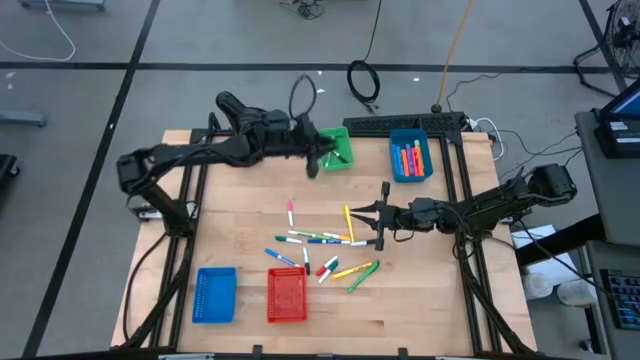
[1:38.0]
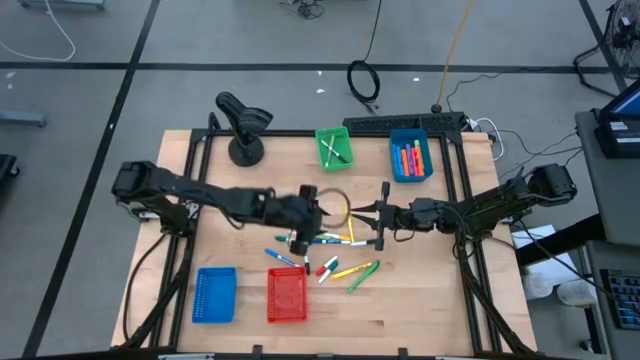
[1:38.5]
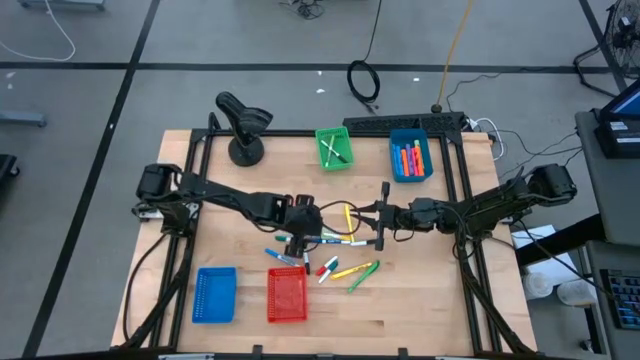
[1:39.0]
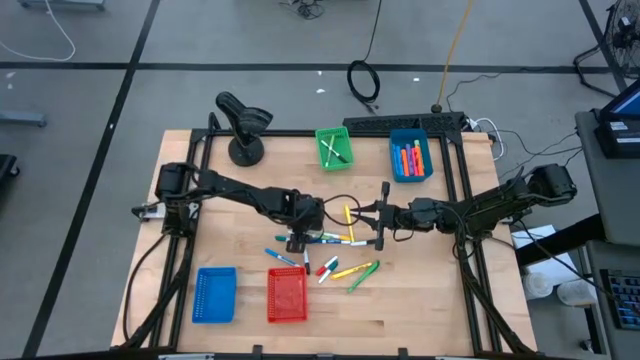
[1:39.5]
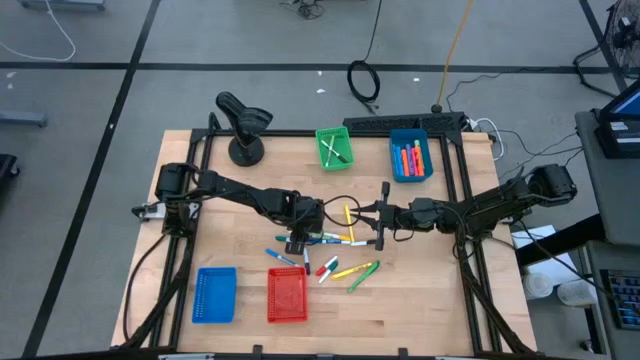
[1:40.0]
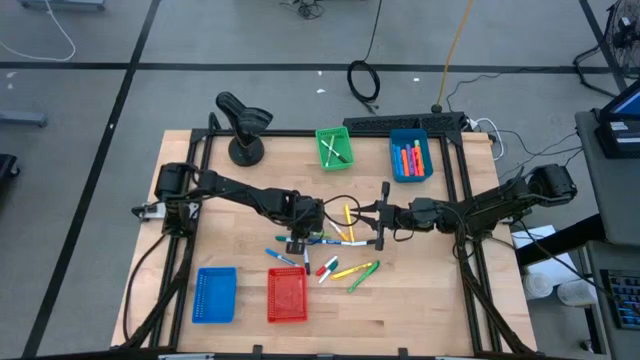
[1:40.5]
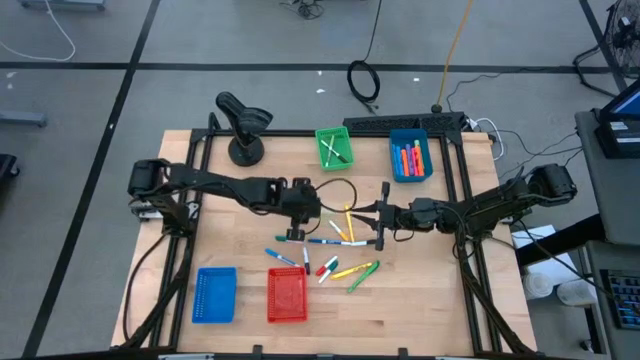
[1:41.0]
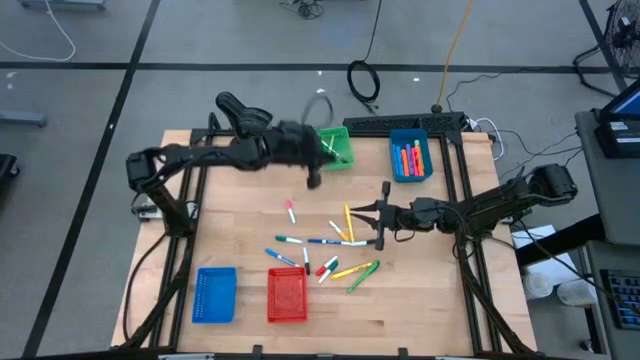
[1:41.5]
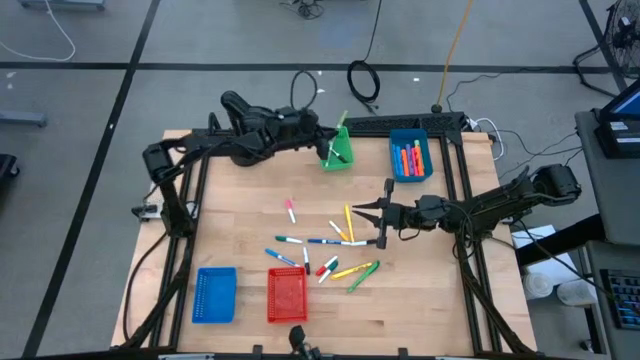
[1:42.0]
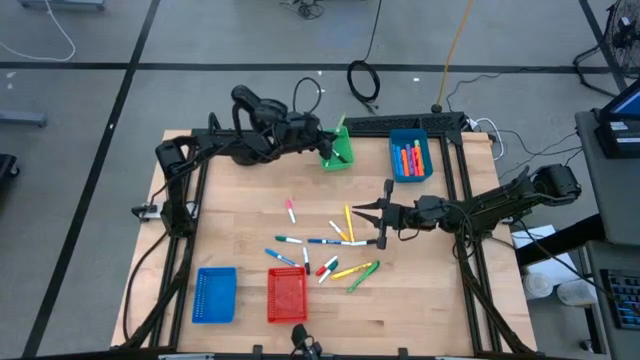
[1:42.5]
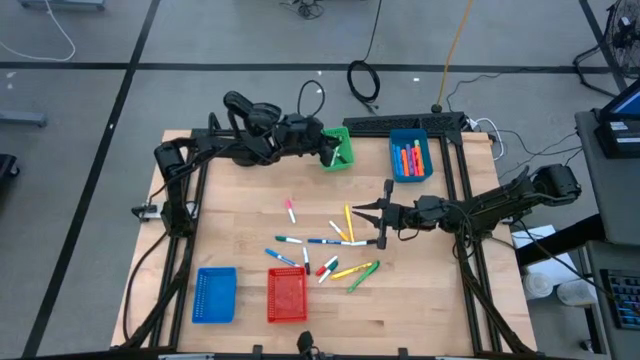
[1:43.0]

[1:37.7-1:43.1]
Task: Pick & Place Markers
Put the green thin dry erase marker into the green bin

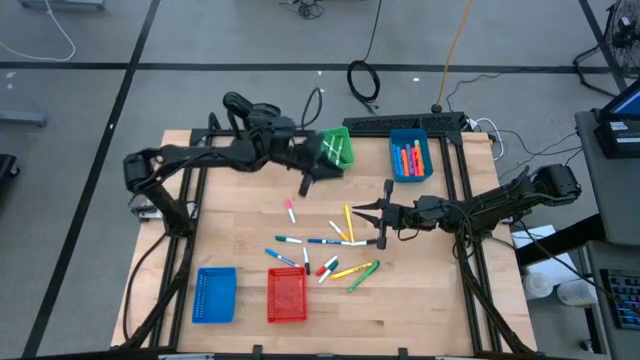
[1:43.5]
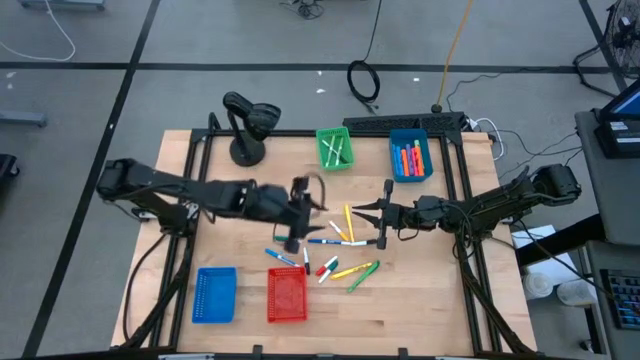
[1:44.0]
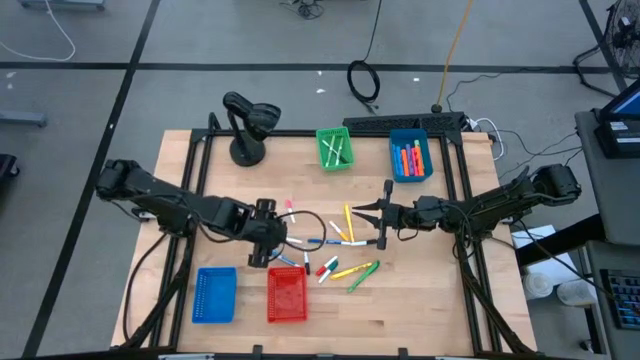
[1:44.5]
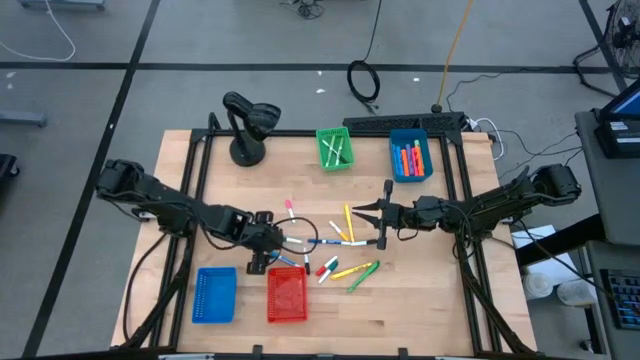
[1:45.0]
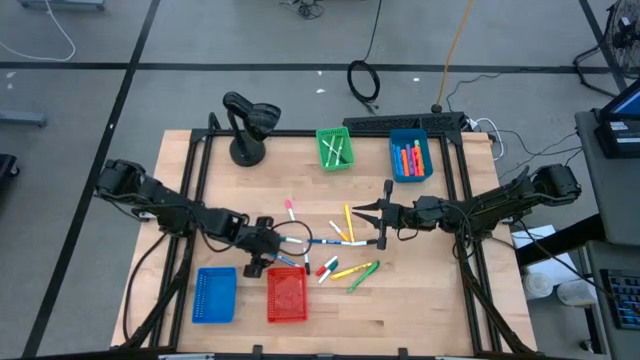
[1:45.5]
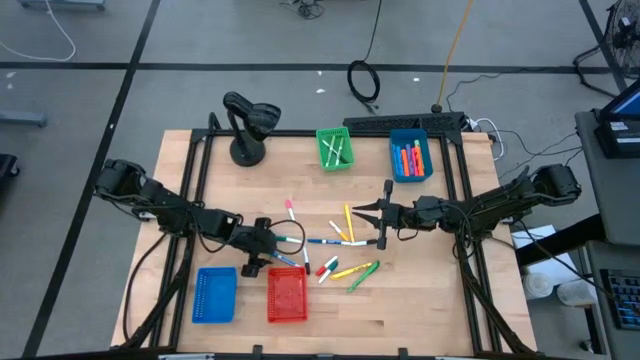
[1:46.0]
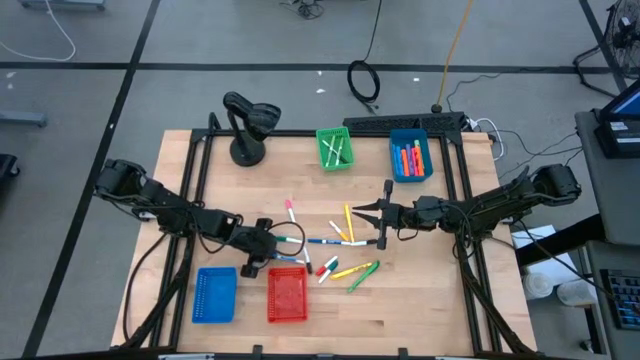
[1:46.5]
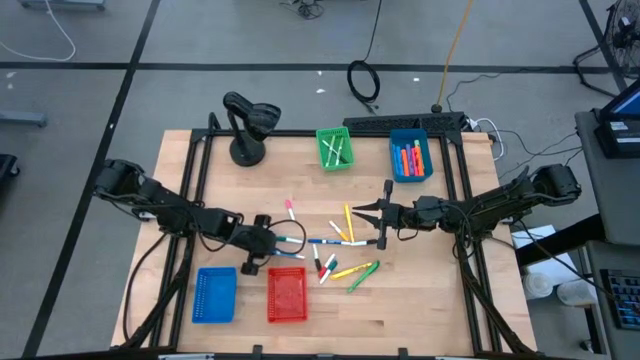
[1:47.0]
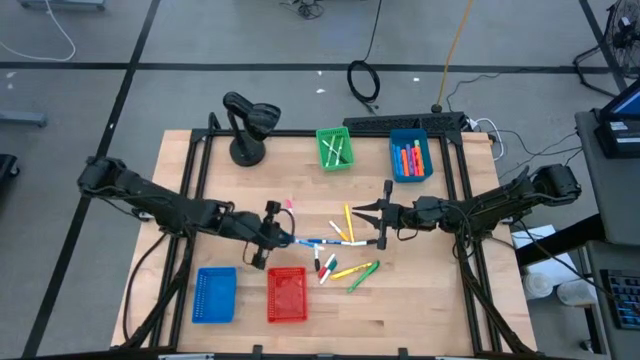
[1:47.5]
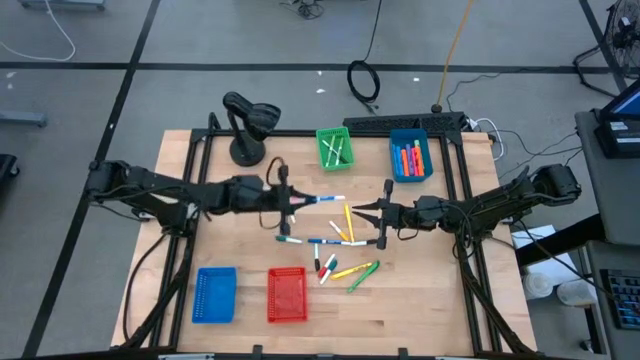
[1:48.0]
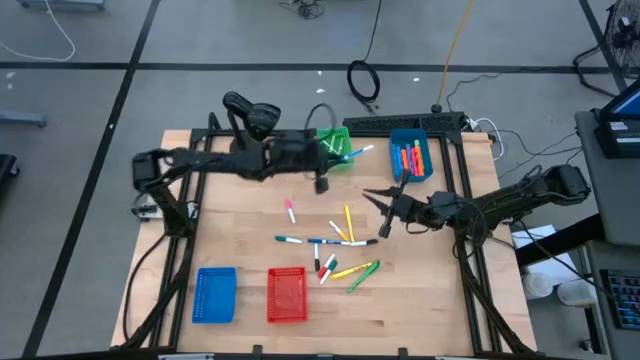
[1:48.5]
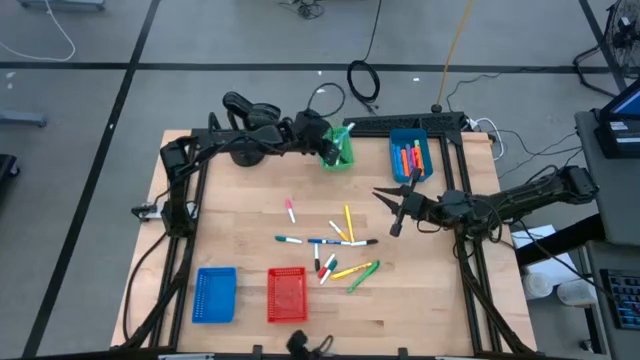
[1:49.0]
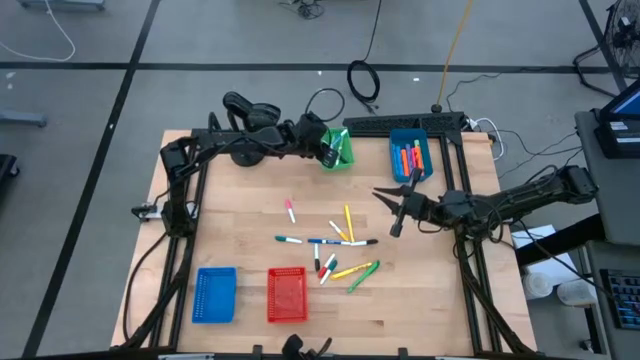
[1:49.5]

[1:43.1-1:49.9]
Put the light blue thin dry erase marker into the green bin

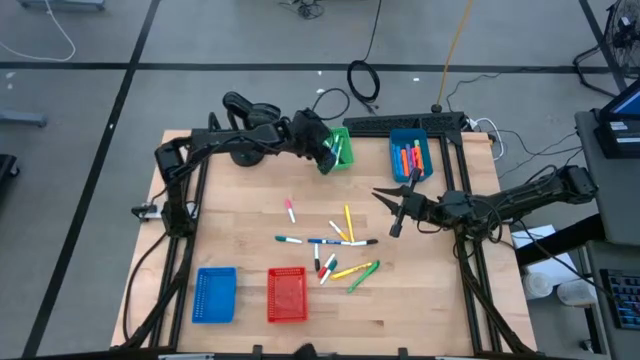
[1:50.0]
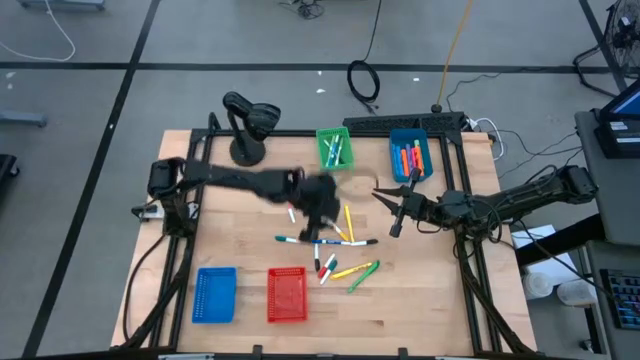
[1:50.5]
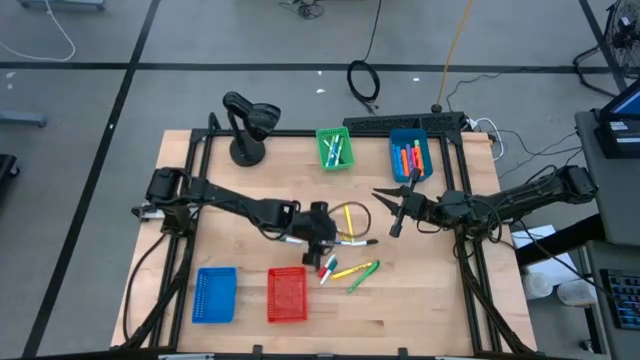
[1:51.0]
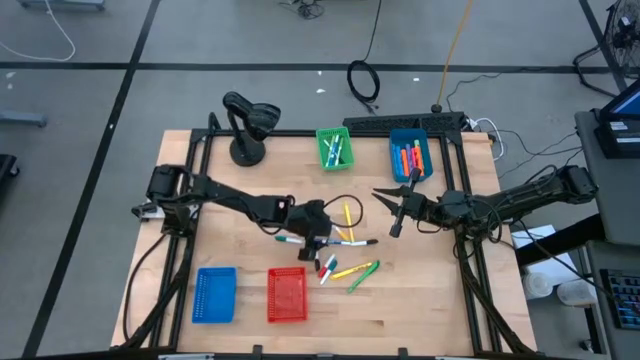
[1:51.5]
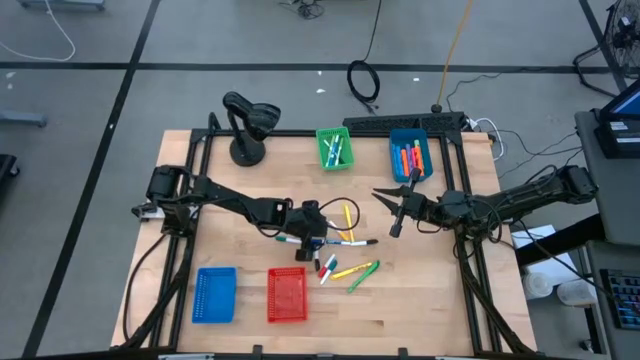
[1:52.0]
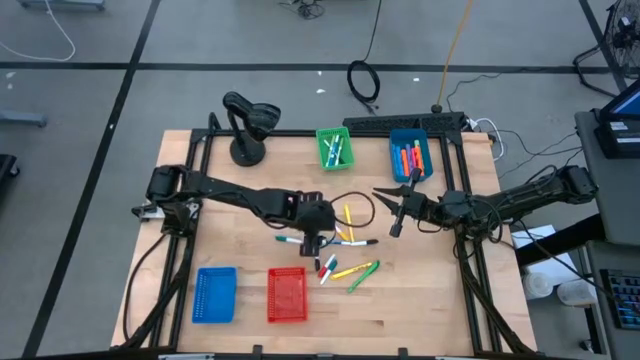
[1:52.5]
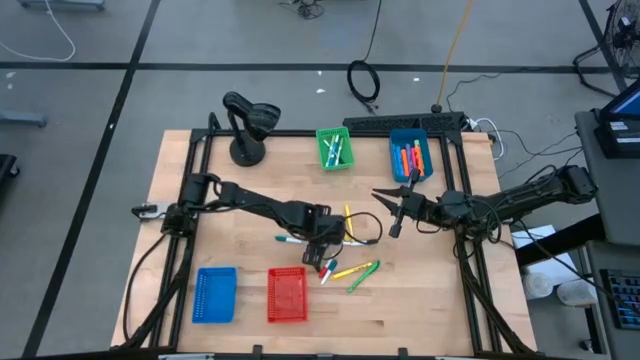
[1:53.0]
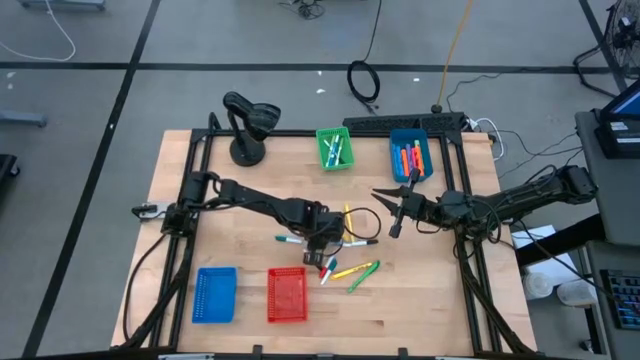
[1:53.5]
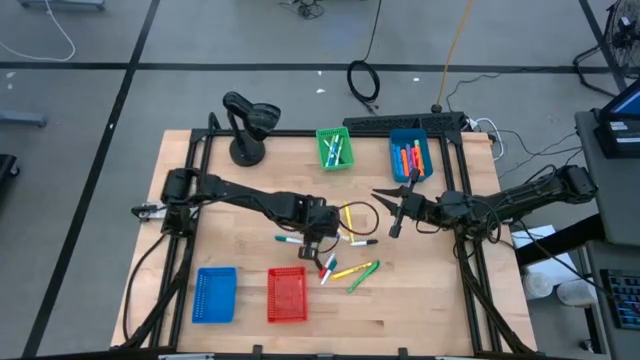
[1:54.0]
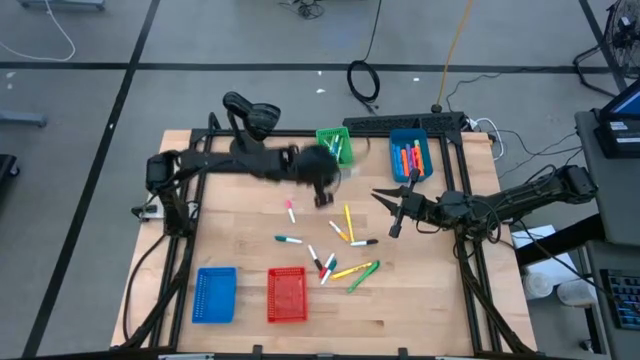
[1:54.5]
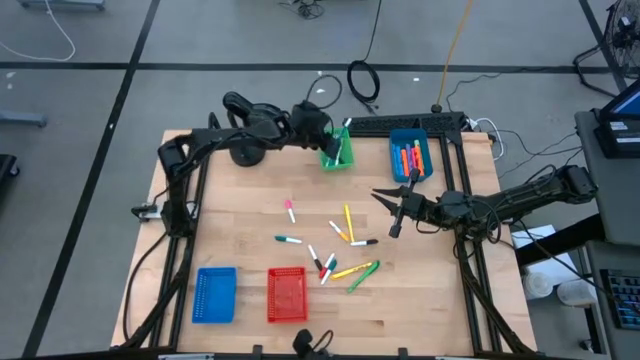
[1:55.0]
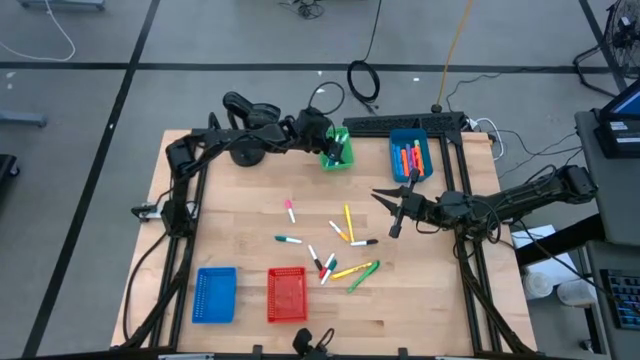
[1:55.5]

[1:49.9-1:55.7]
Put the blue thin dry erase marker into the green bin

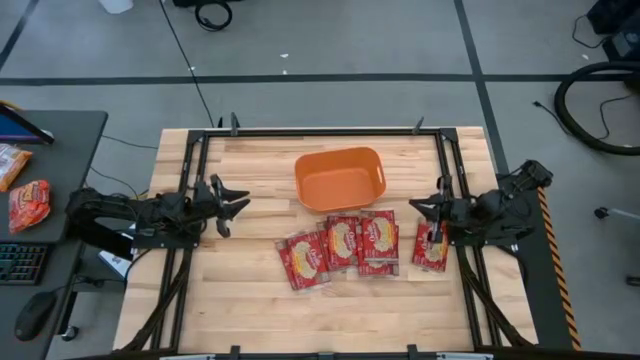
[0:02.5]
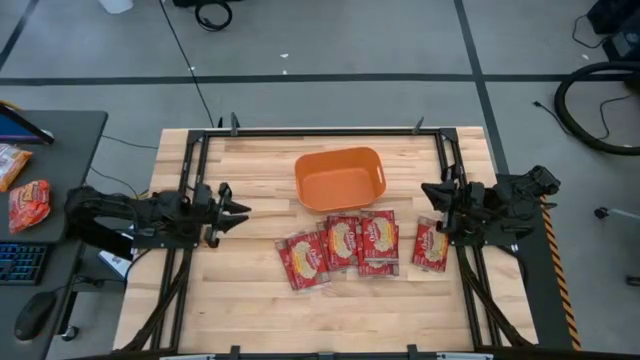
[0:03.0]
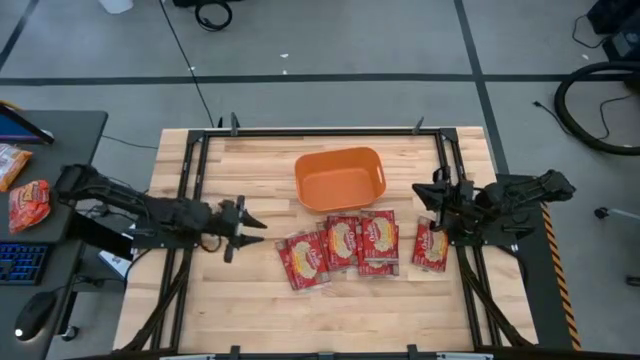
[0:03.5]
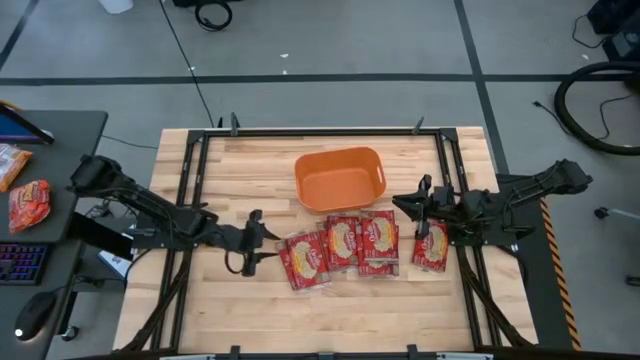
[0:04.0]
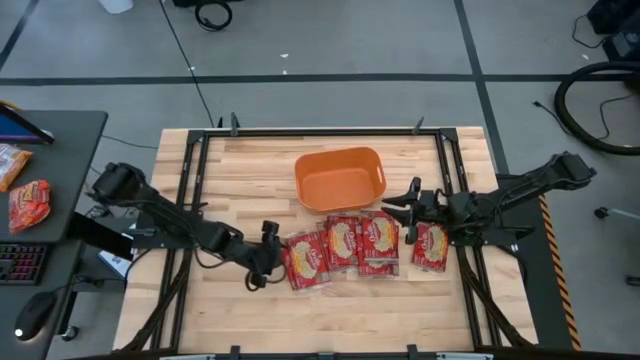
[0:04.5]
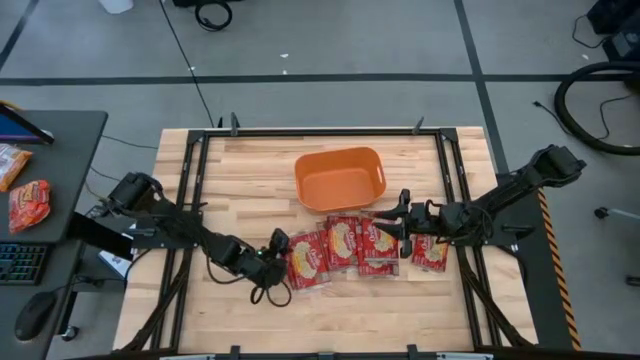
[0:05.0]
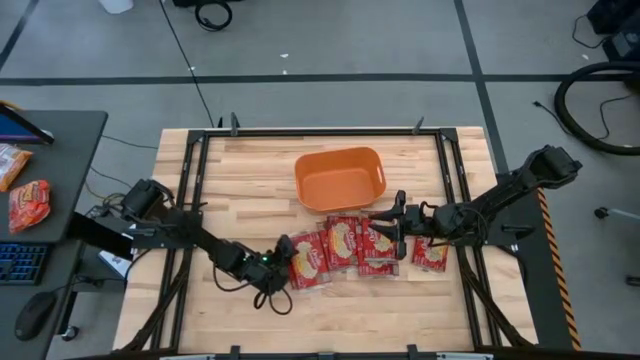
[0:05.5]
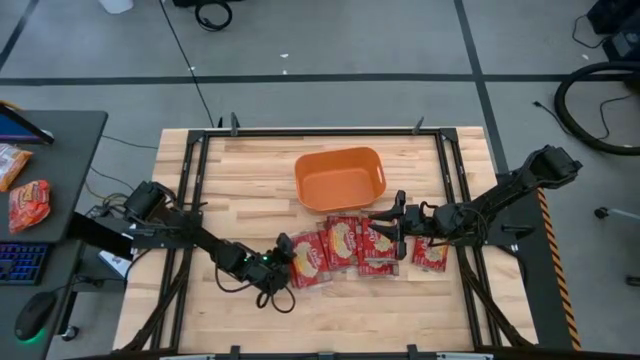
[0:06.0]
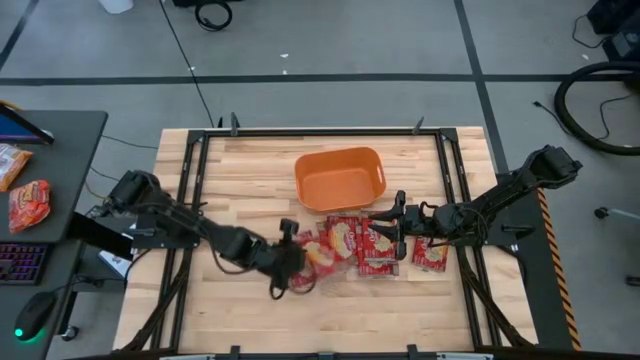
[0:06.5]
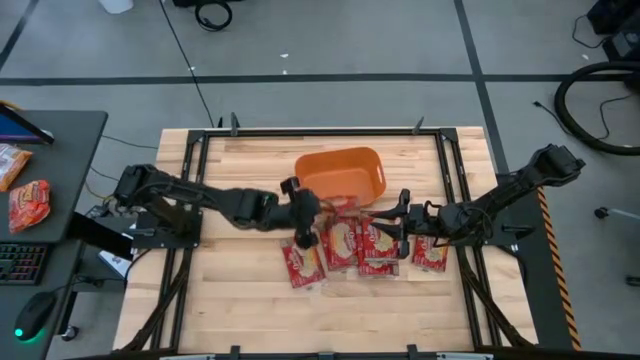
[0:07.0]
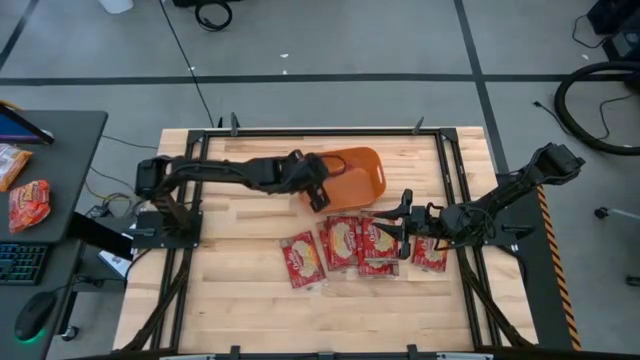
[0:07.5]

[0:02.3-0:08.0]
Task: Sort popcorn bags into baskets
Put the red popcorn bag into the orange bin
